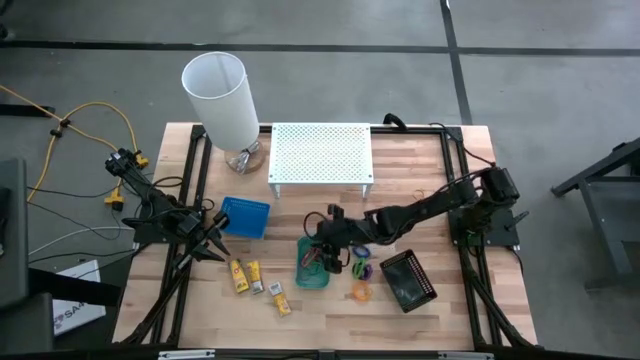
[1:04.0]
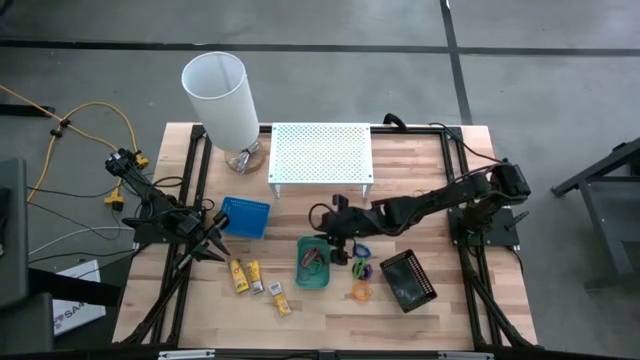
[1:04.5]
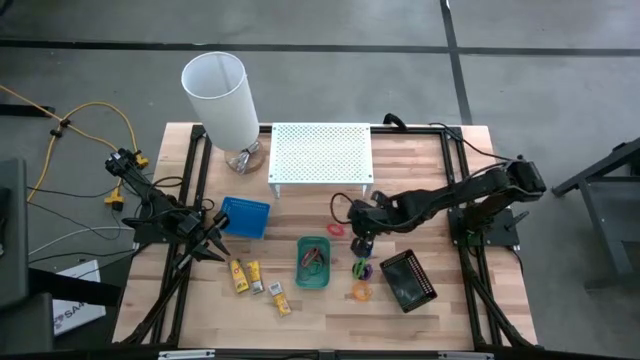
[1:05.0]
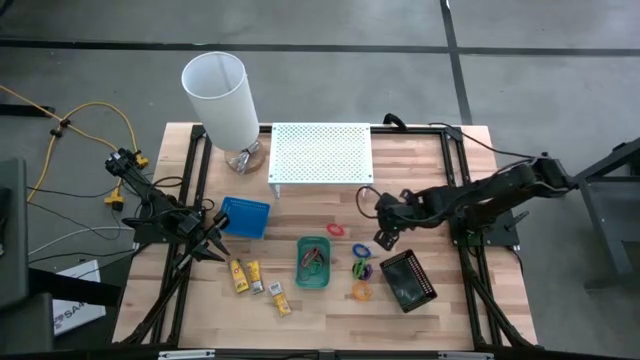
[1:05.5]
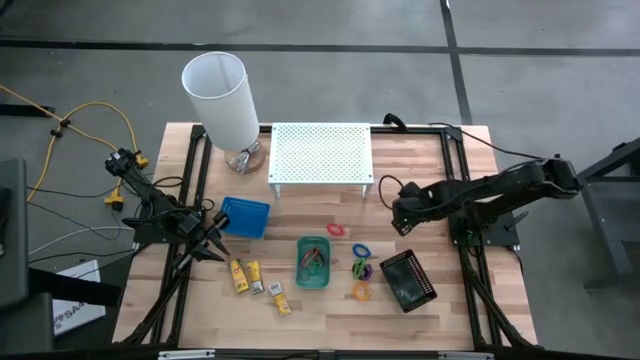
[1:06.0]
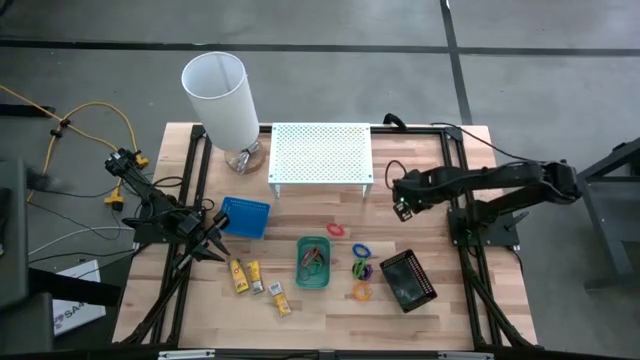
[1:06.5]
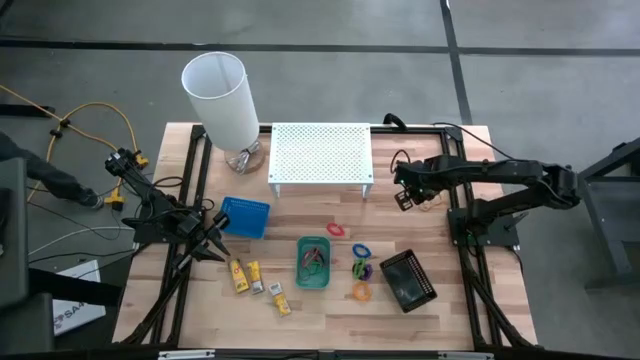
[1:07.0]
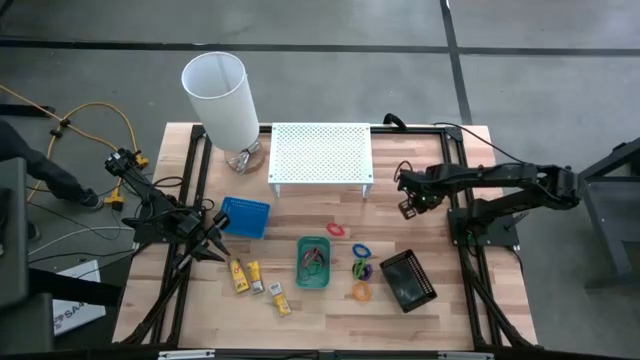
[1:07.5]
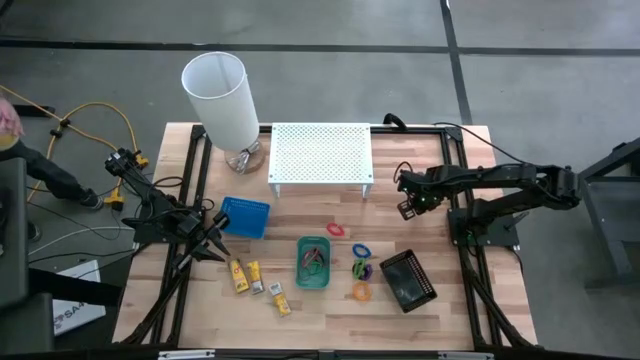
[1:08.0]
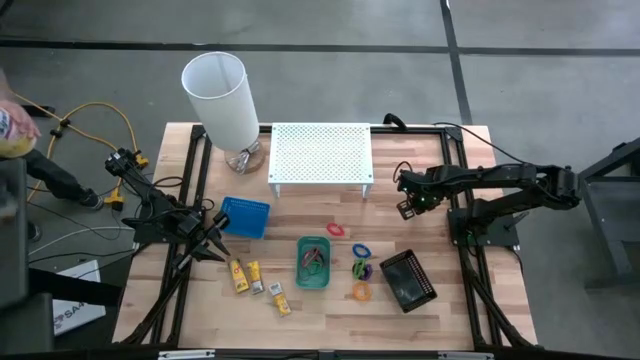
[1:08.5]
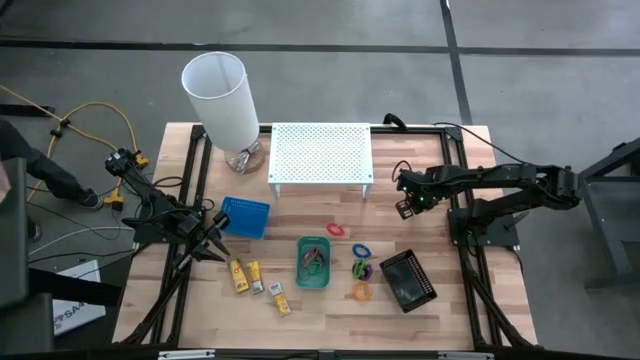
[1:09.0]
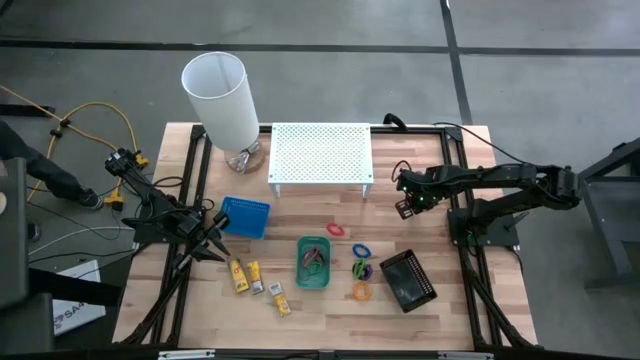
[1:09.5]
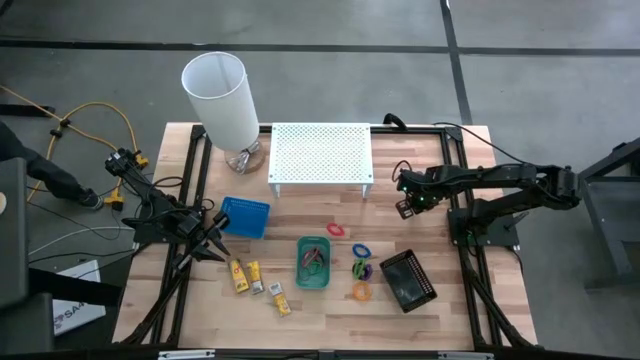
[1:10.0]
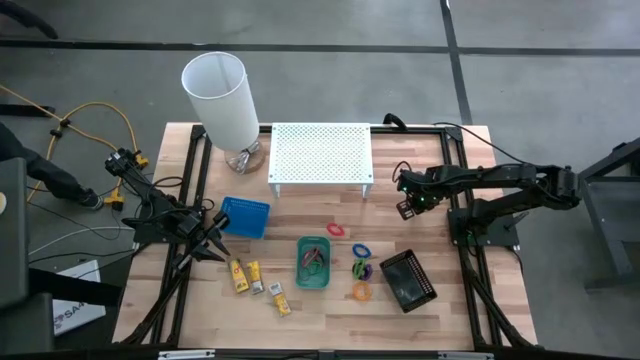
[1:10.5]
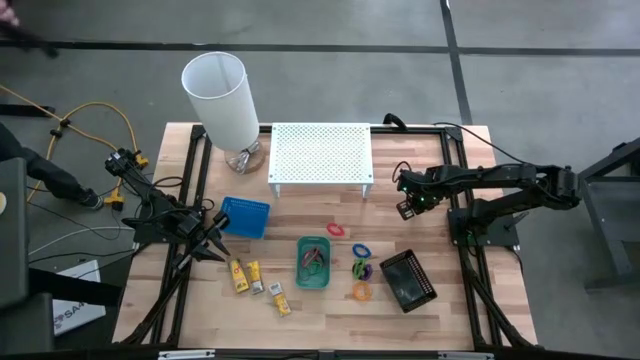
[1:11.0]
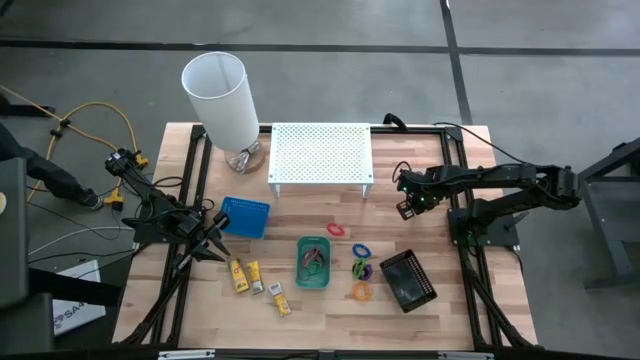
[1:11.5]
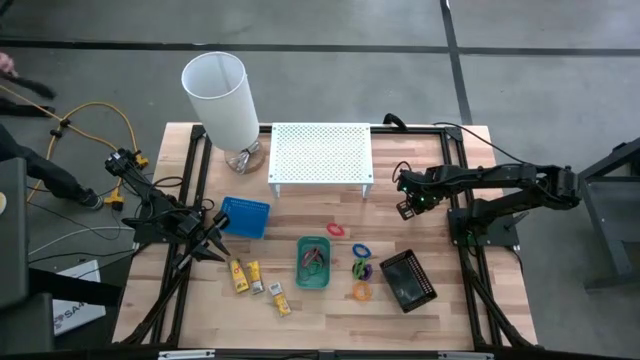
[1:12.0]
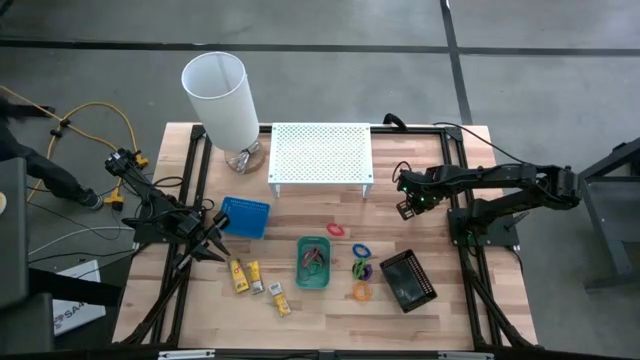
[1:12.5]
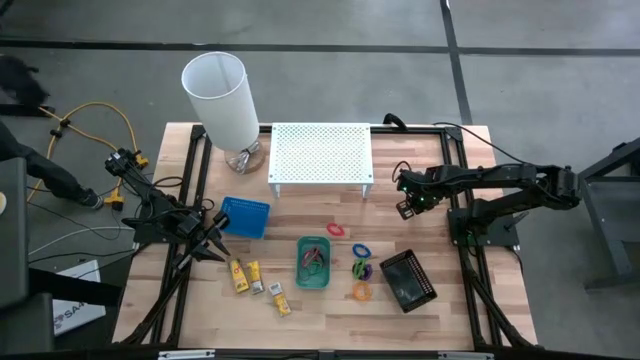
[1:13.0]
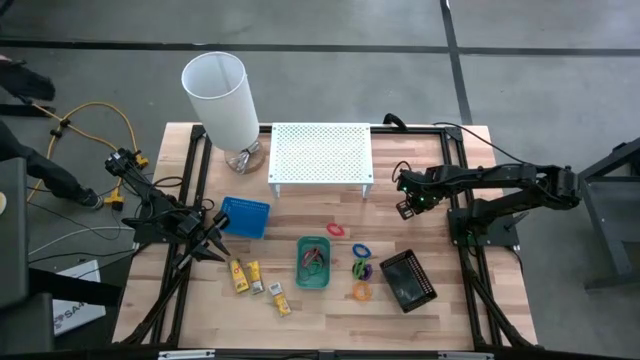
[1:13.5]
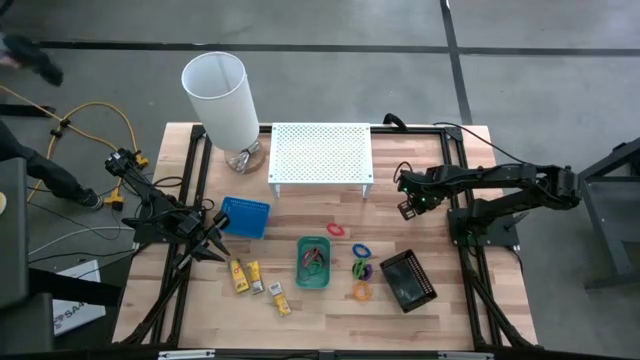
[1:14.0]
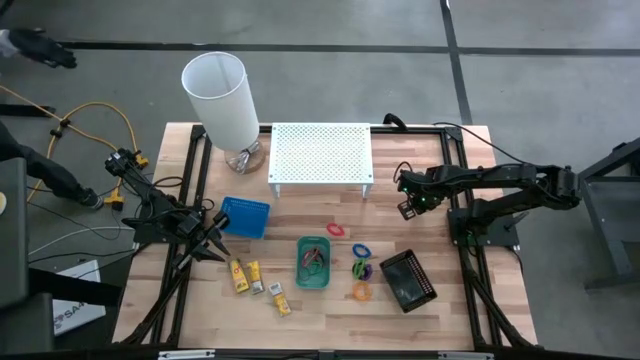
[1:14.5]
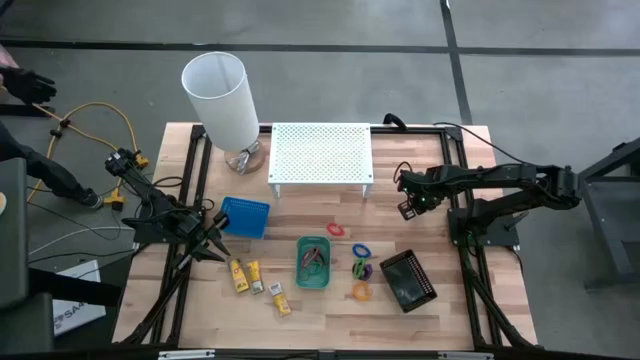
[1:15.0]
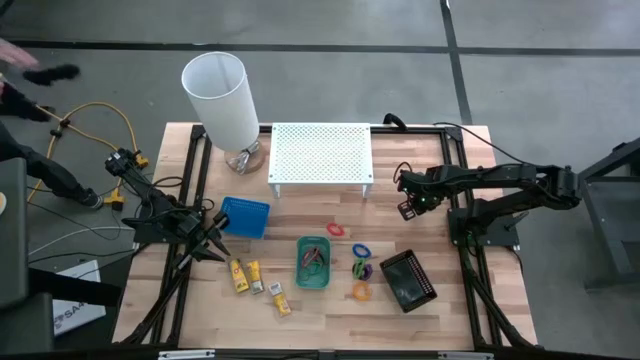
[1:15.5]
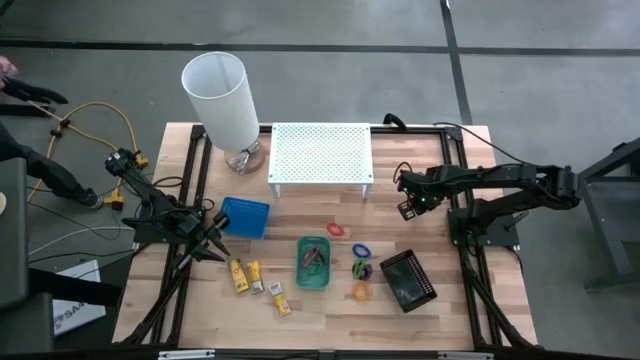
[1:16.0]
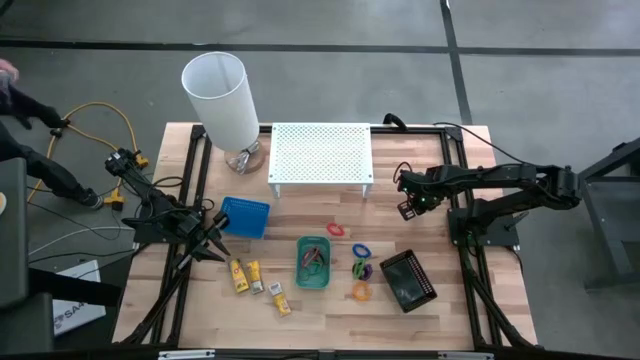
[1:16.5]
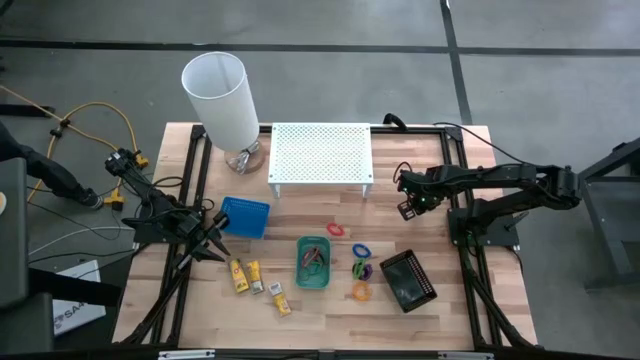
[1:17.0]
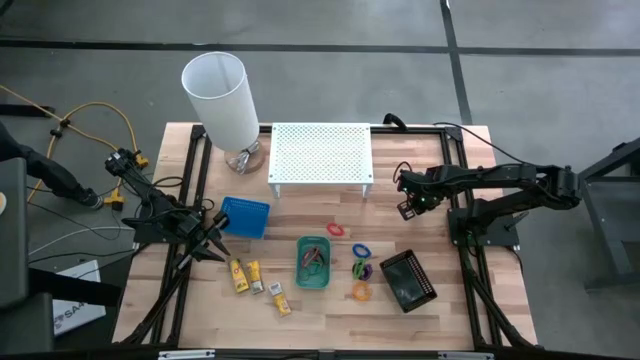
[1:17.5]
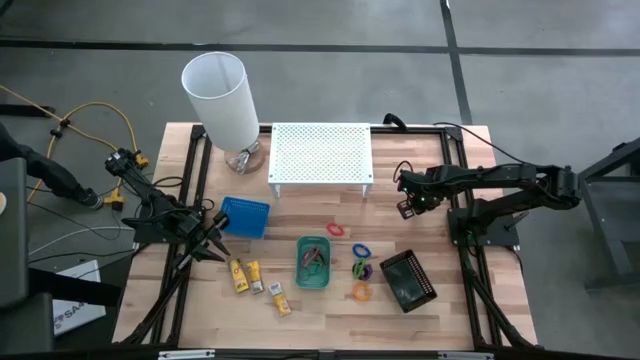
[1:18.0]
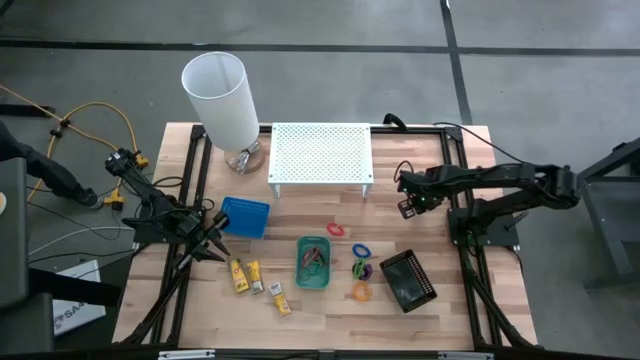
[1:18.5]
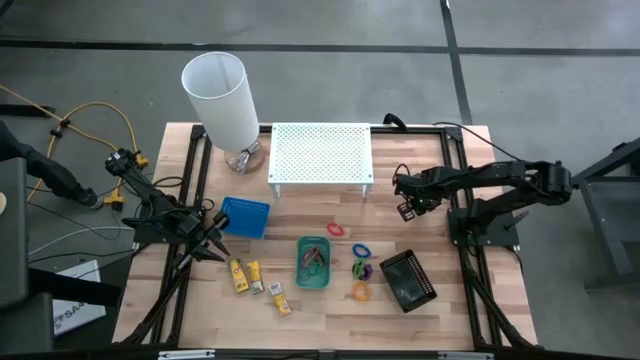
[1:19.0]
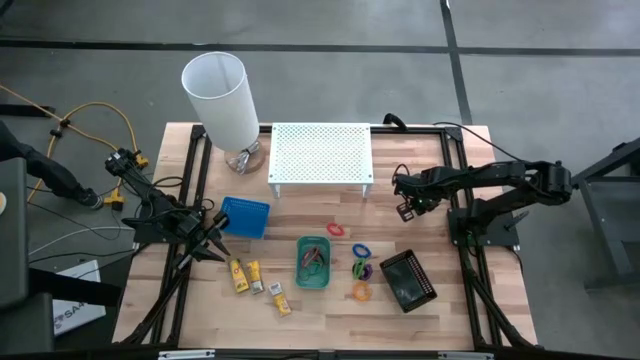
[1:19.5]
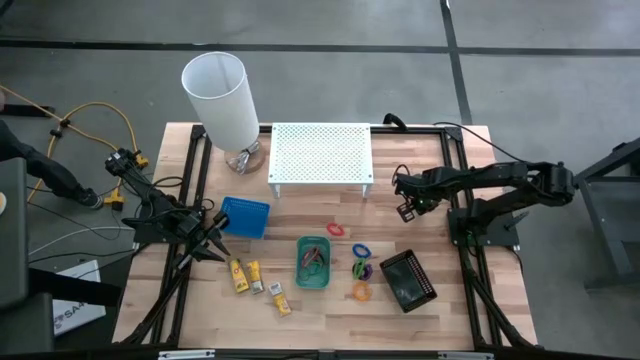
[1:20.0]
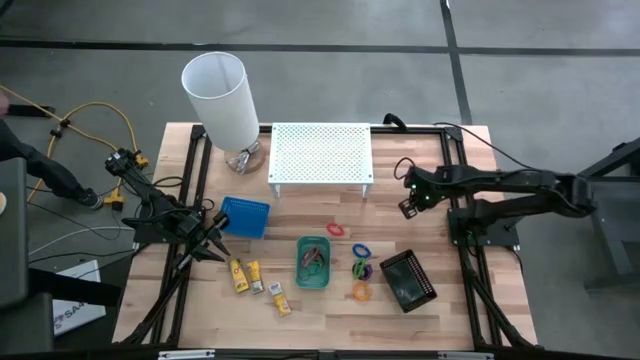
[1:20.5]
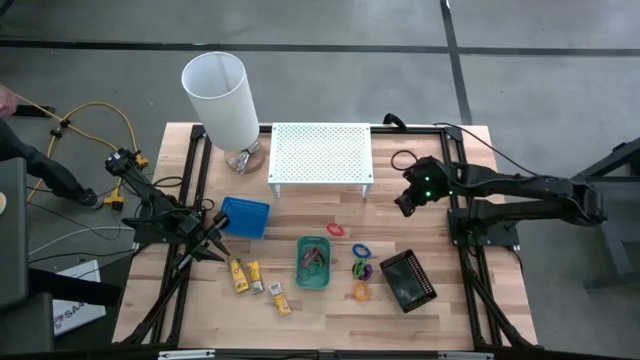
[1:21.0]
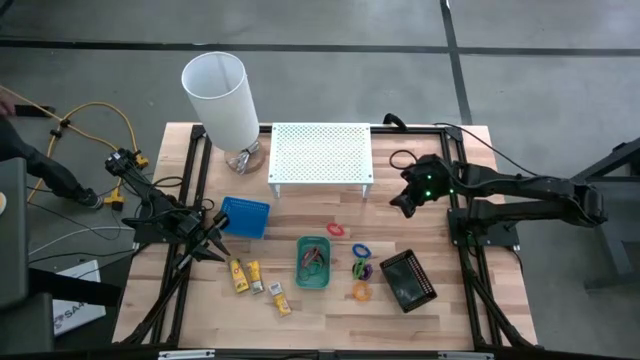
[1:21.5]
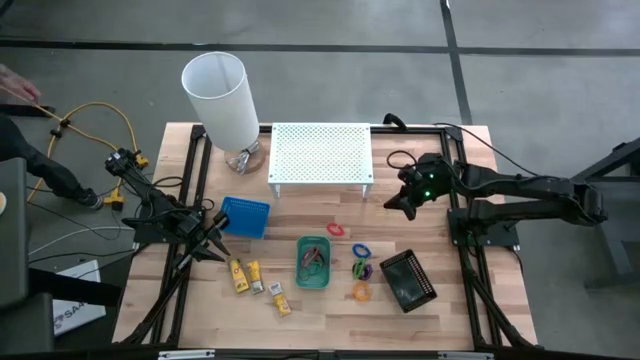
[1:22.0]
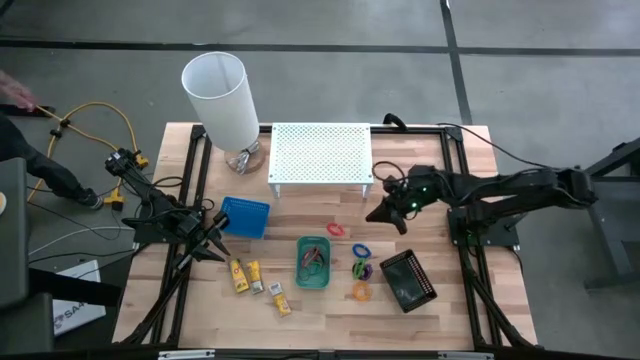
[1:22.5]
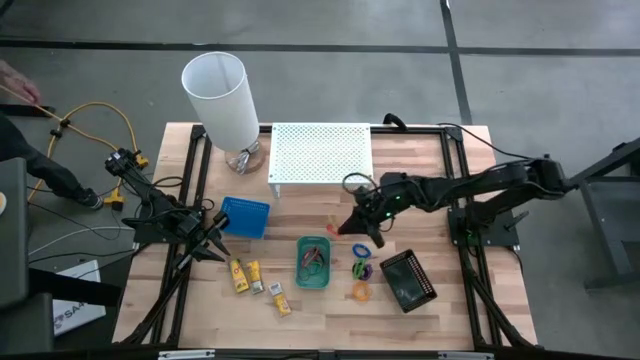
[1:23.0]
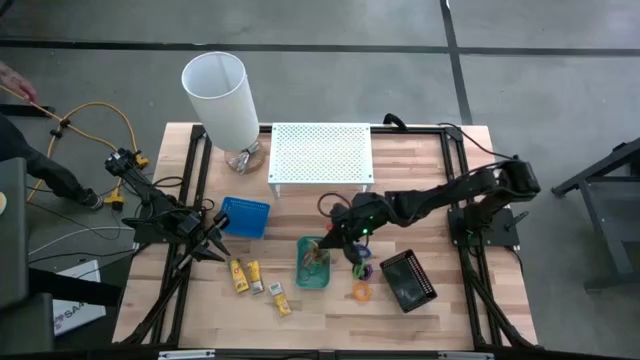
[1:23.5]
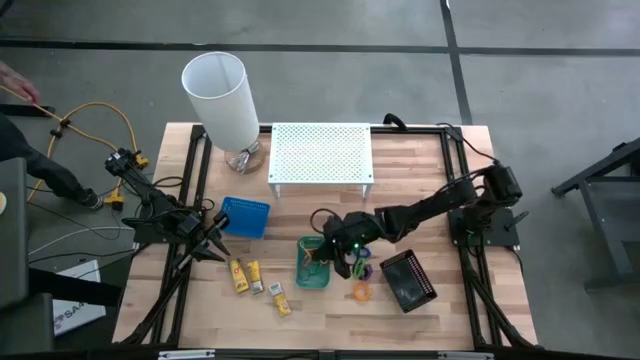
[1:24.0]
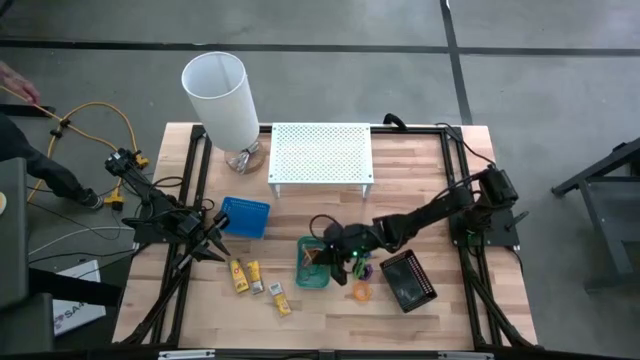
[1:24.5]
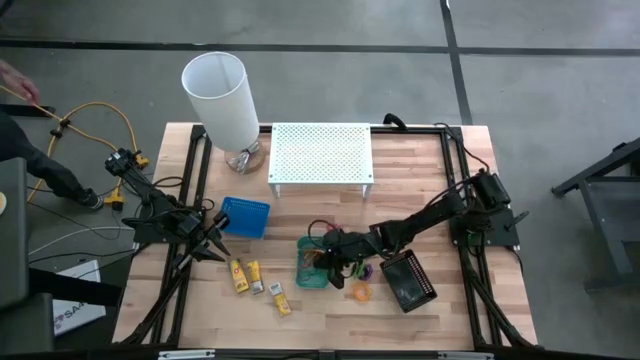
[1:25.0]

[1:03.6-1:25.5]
Task: Pick & Place Office Desk Supplies
Put the yellow rubber band into the green bin

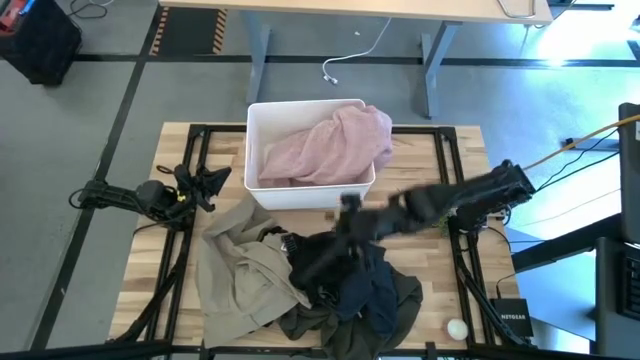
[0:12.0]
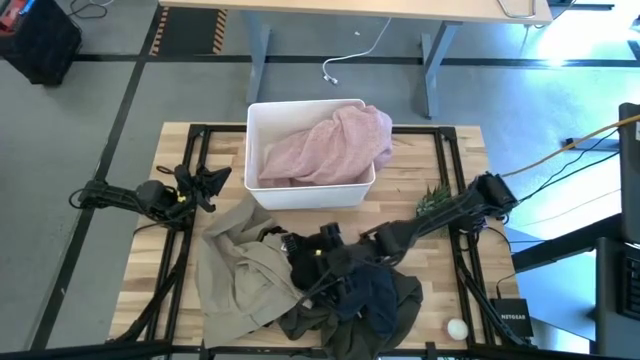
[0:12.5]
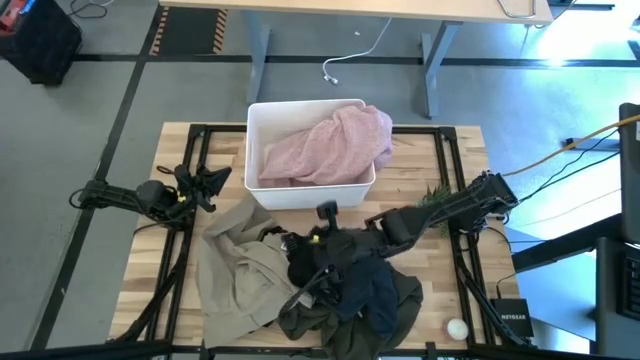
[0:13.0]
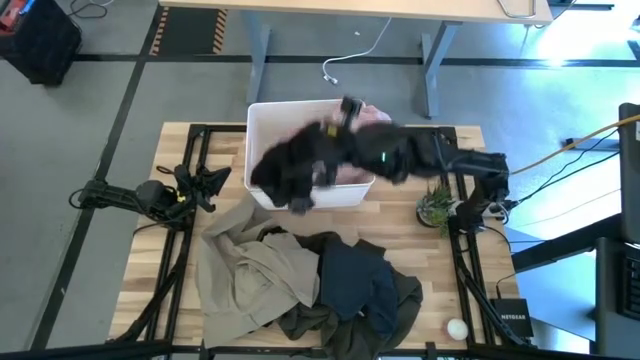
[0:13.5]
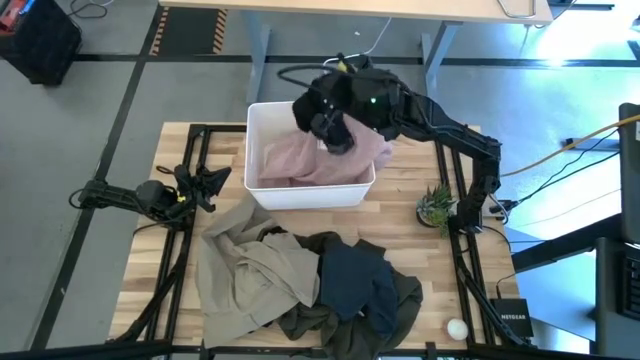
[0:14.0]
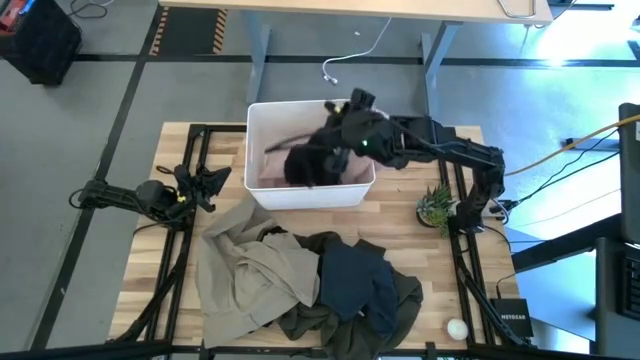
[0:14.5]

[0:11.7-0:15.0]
Task: Sort clothes
Put the black boxer into the white laundry bin
